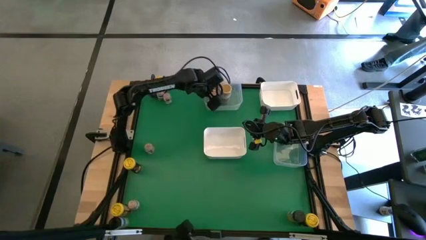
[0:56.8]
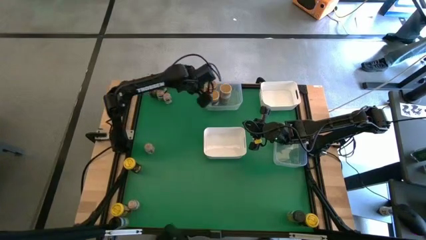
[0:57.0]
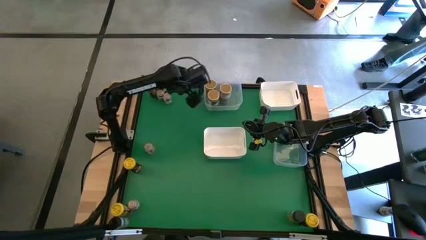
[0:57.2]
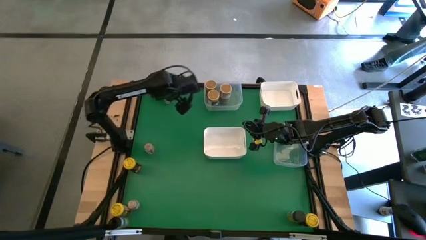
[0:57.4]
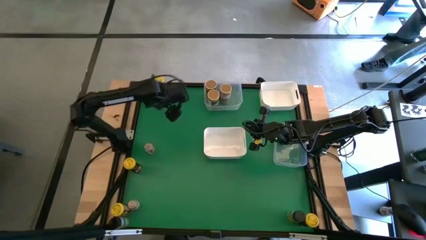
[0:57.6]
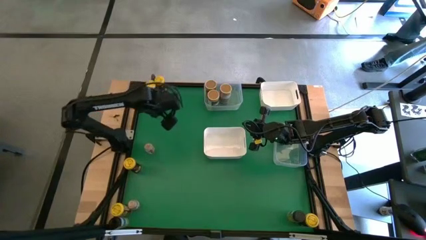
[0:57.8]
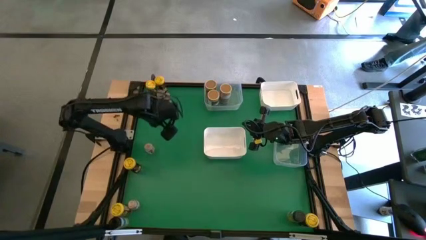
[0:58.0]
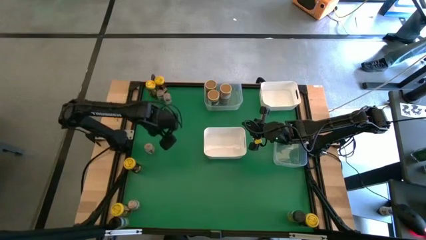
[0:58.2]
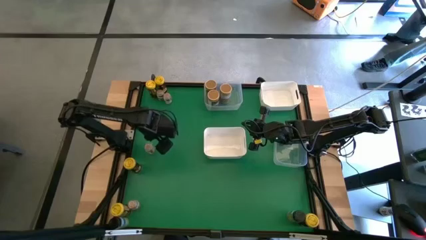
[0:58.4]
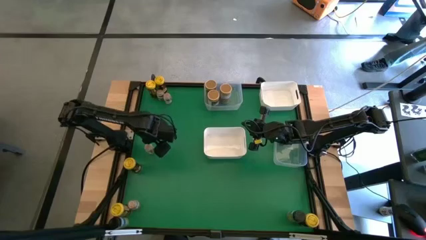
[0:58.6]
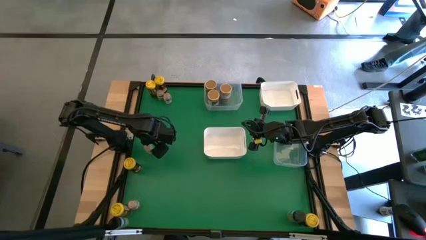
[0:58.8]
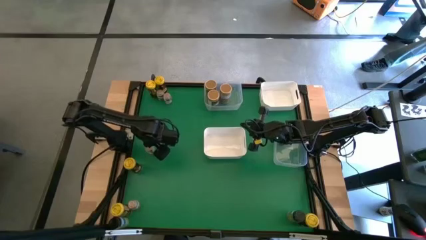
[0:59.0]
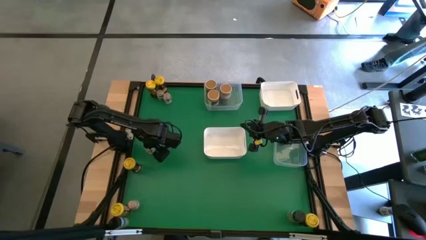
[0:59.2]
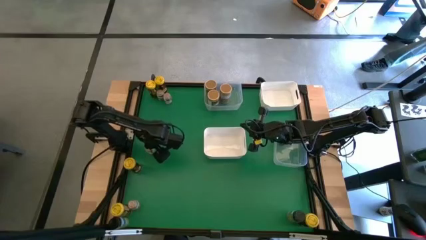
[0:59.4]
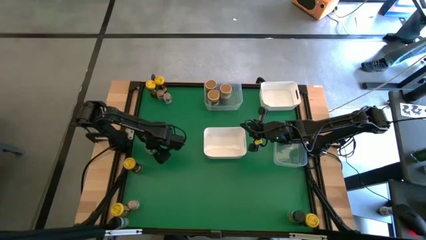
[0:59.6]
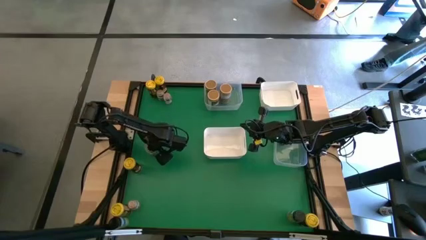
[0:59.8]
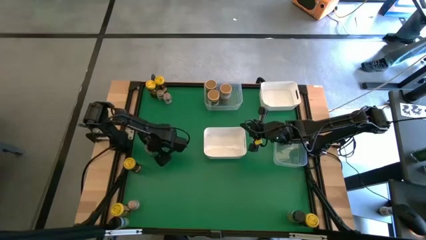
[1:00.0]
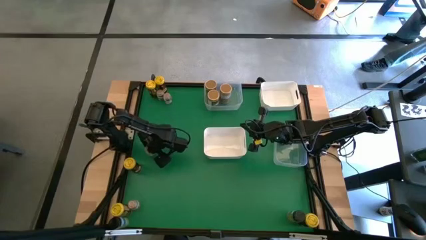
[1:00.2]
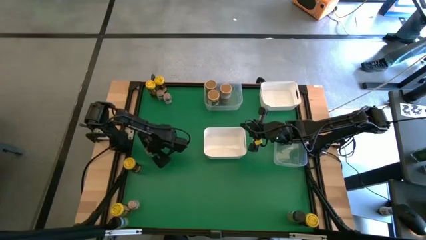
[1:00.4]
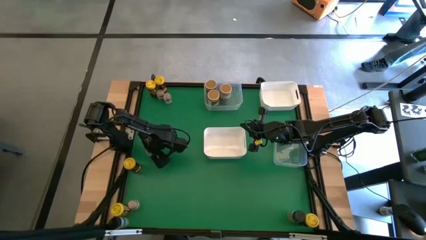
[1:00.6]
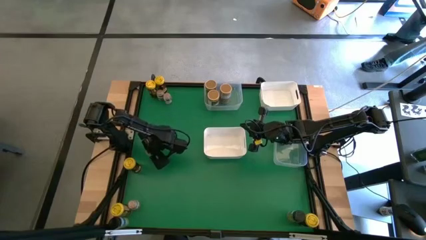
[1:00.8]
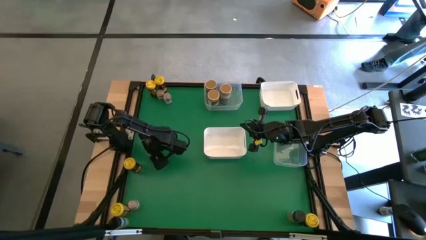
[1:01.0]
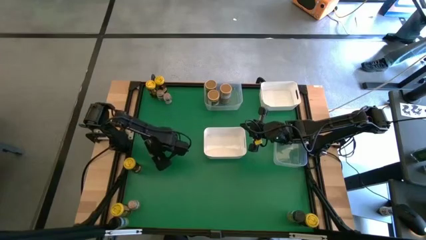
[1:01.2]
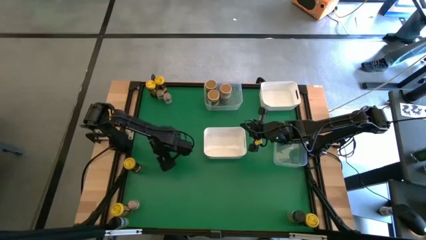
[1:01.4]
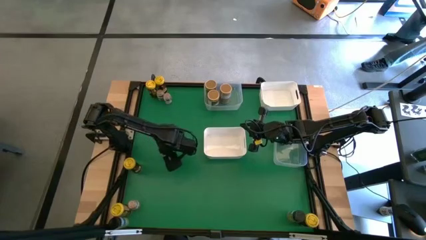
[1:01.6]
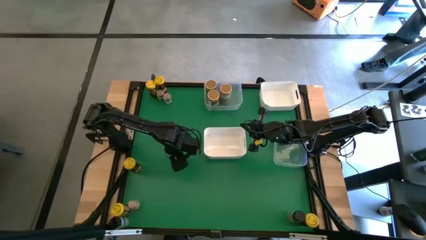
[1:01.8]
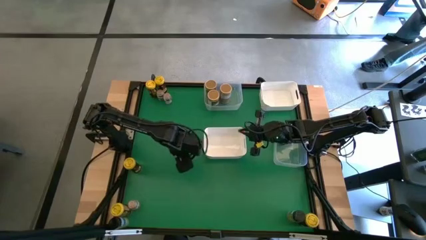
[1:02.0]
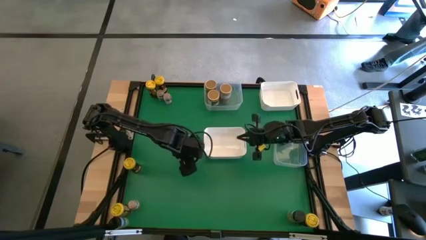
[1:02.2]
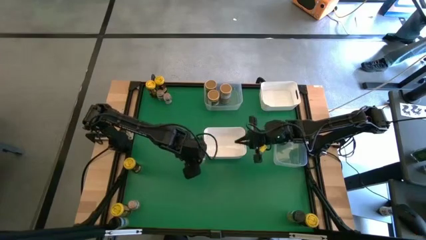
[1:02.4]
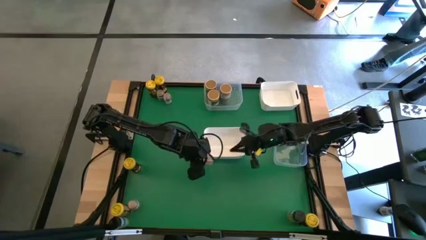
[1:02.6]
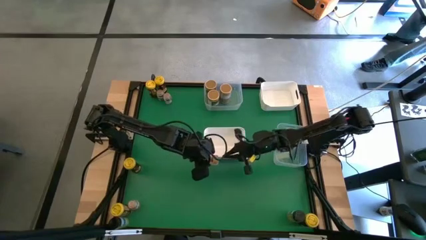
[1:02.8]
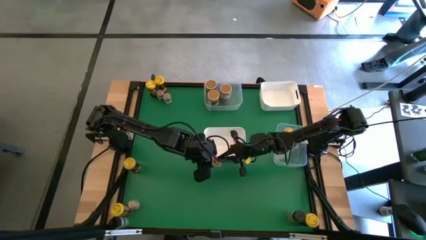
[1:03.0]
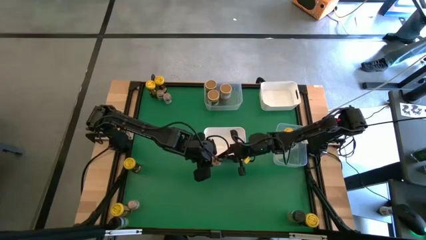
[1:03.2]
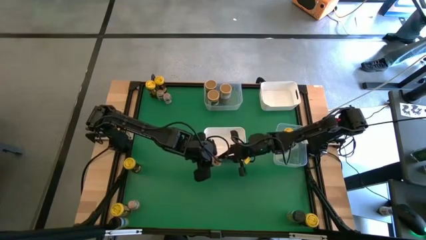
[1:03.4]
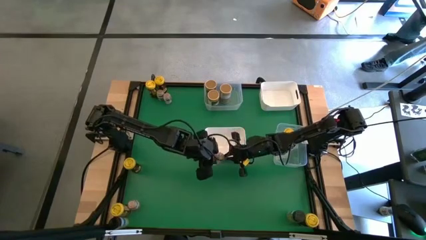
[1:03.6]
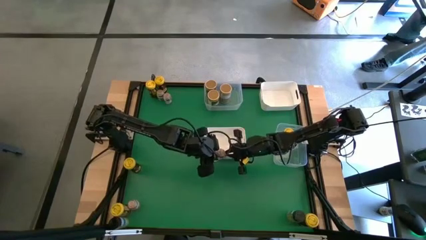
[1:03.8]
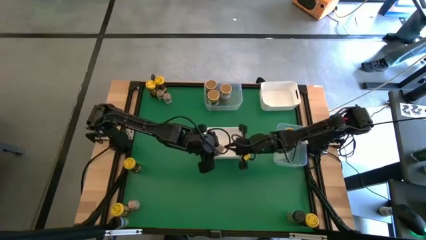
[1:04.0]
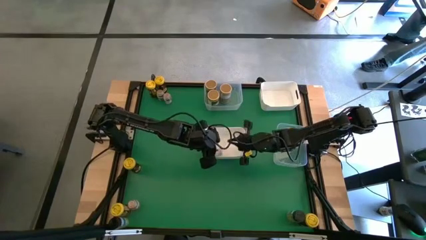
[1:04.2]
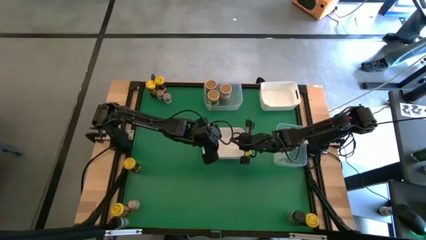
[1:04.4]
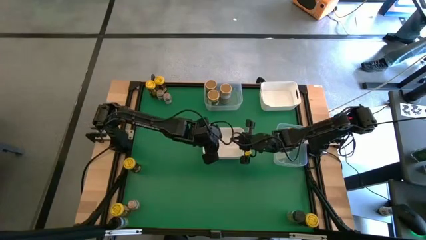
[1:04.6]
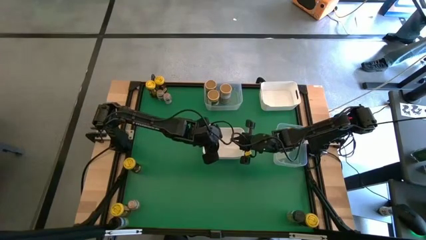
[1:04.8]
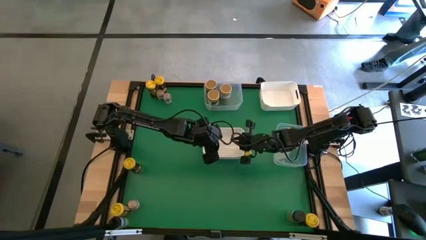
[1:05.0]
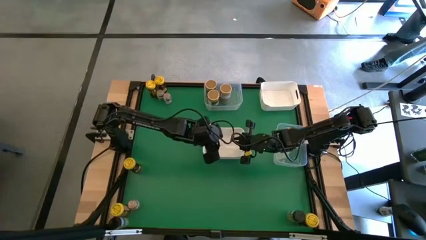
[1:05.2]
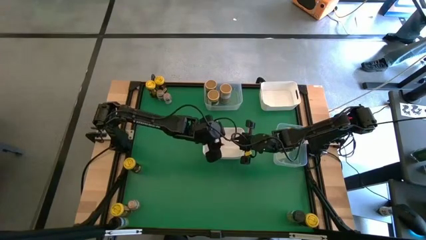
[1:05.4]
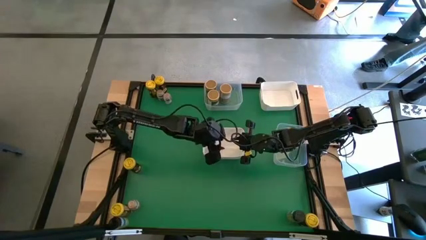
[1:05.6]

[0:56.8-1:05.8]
Task: Sort spices by type
Put the brown seasoning bottle into the bottom white bin

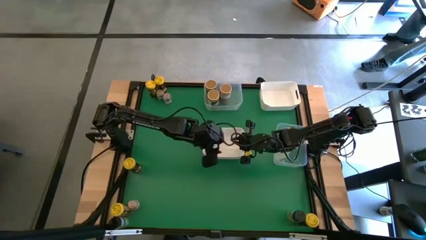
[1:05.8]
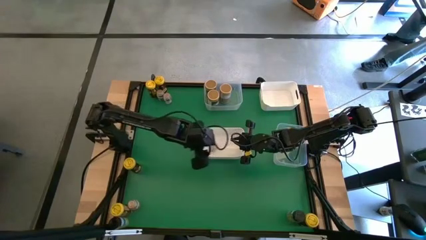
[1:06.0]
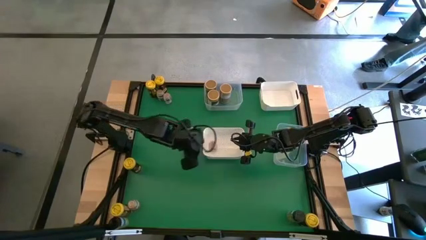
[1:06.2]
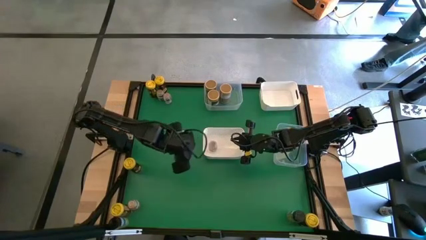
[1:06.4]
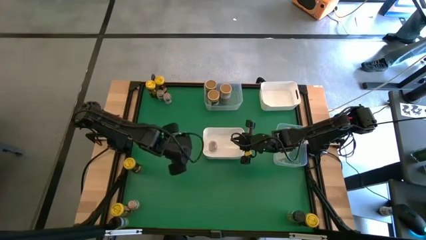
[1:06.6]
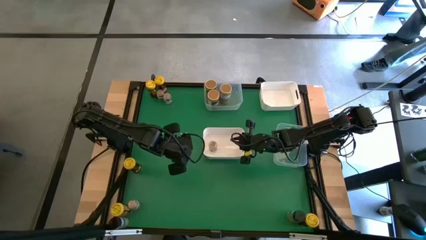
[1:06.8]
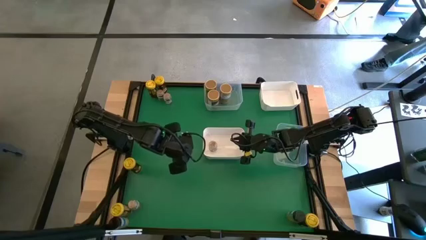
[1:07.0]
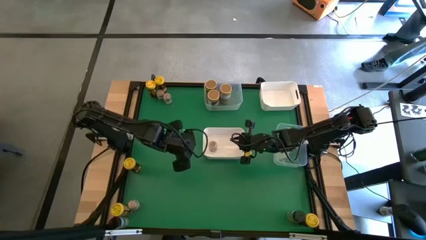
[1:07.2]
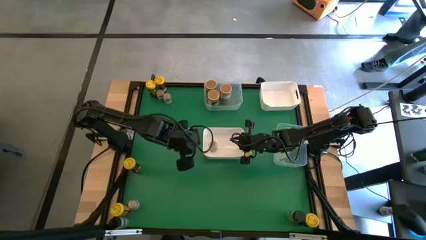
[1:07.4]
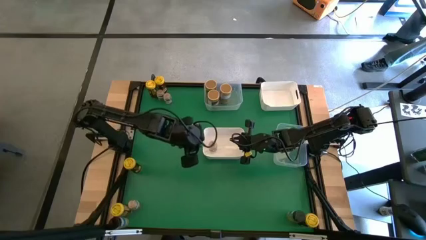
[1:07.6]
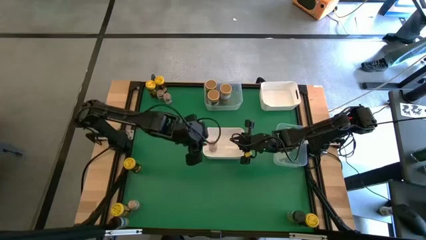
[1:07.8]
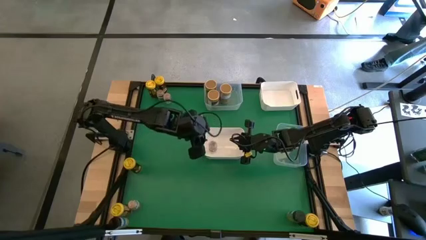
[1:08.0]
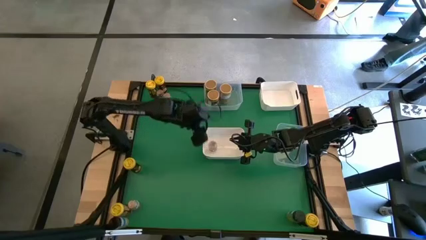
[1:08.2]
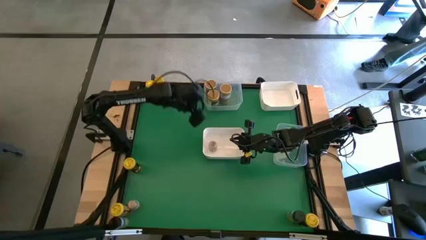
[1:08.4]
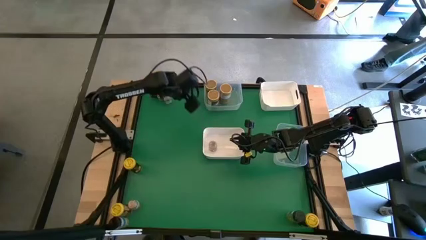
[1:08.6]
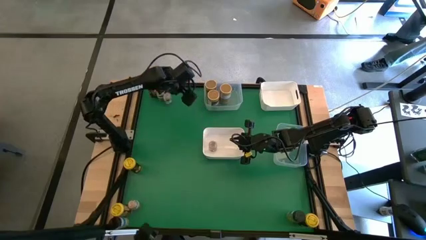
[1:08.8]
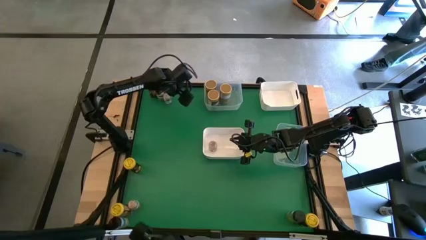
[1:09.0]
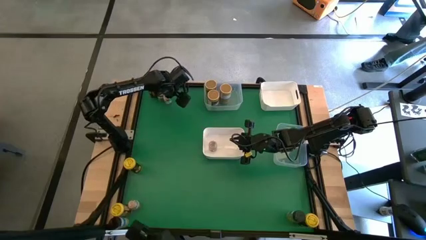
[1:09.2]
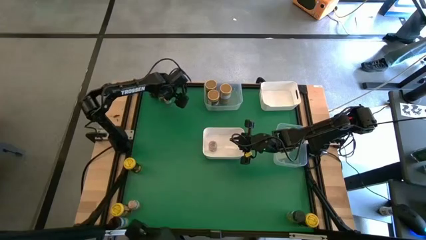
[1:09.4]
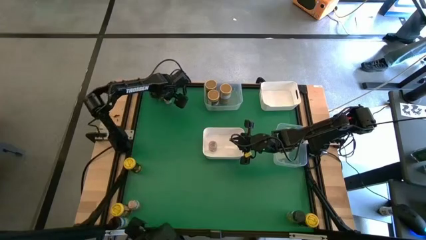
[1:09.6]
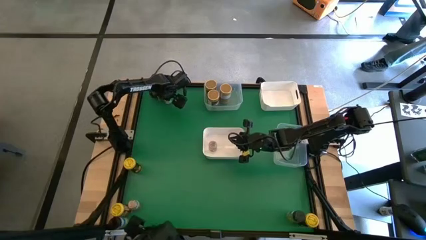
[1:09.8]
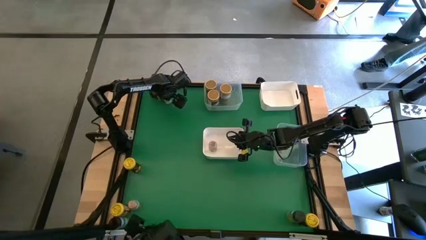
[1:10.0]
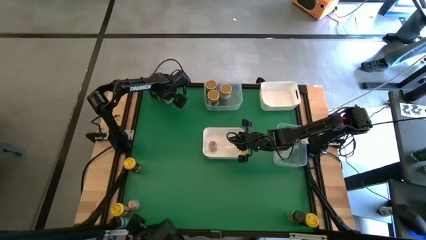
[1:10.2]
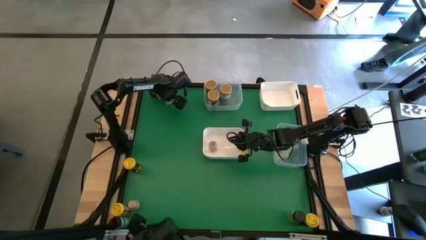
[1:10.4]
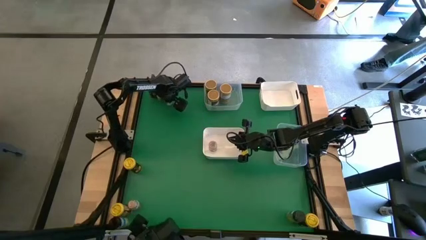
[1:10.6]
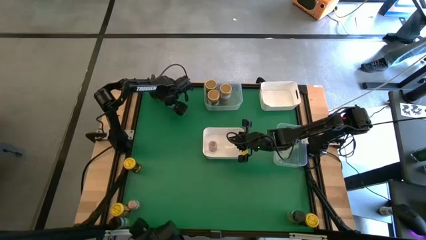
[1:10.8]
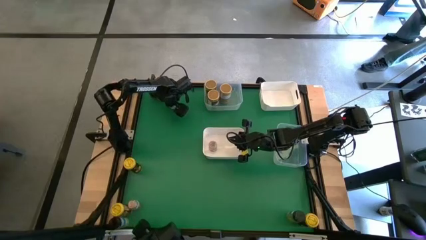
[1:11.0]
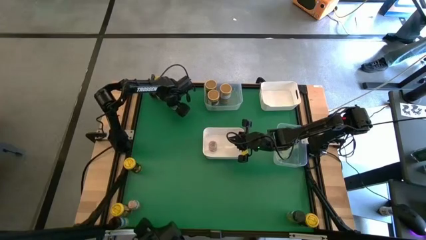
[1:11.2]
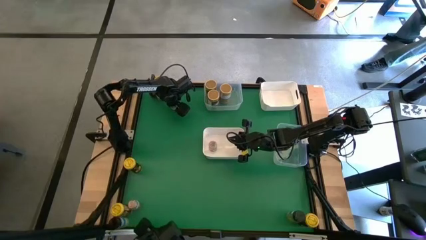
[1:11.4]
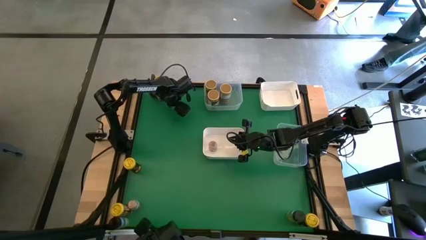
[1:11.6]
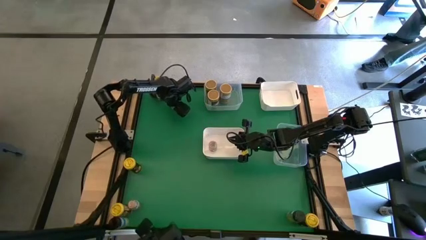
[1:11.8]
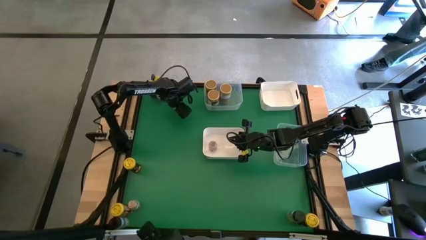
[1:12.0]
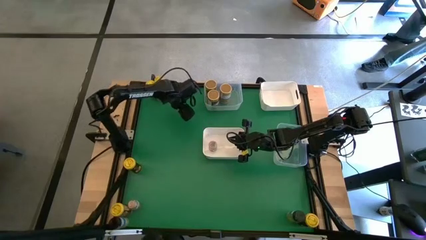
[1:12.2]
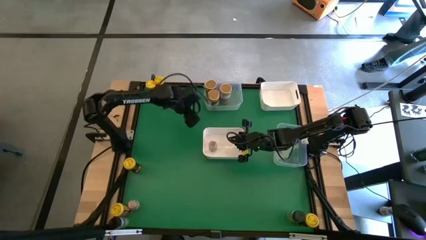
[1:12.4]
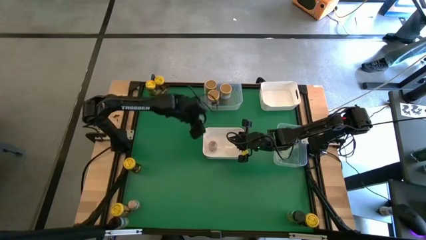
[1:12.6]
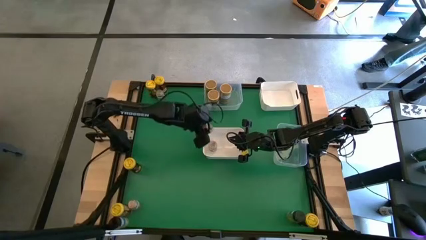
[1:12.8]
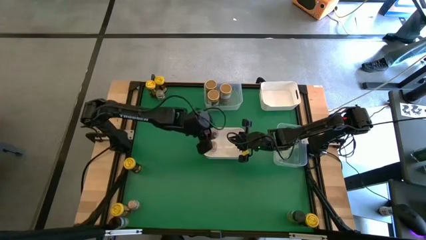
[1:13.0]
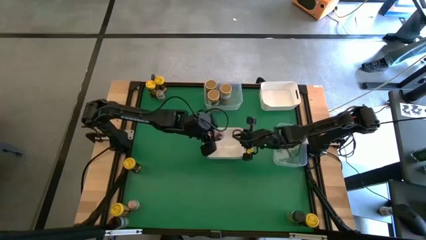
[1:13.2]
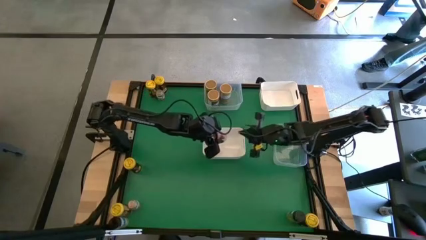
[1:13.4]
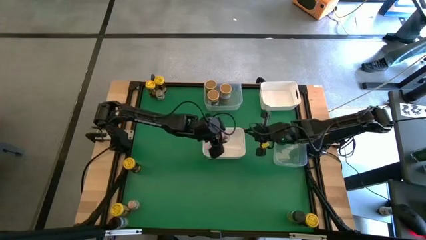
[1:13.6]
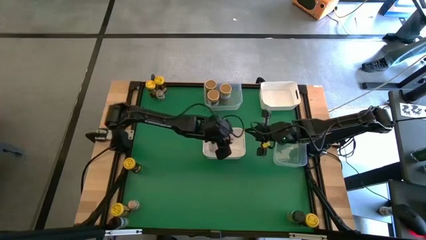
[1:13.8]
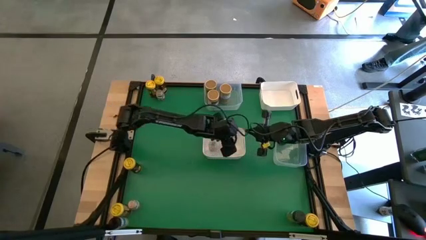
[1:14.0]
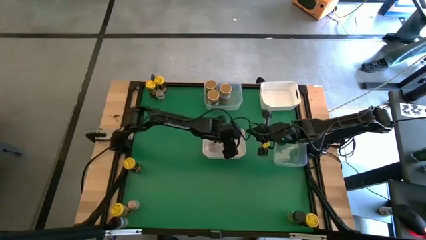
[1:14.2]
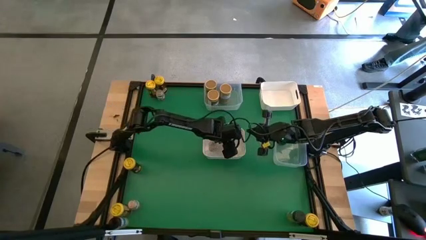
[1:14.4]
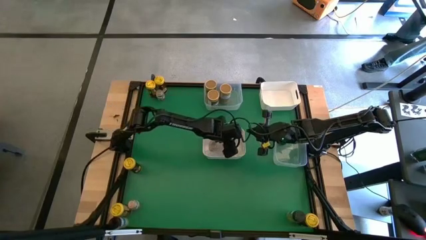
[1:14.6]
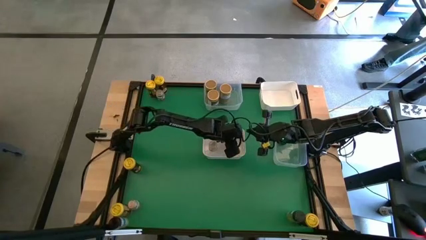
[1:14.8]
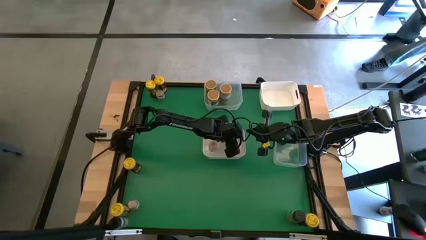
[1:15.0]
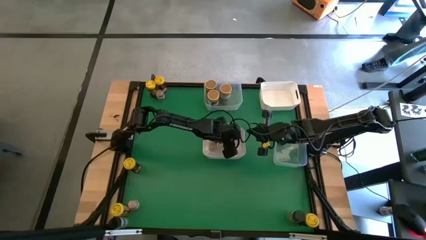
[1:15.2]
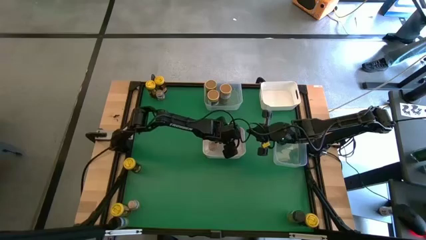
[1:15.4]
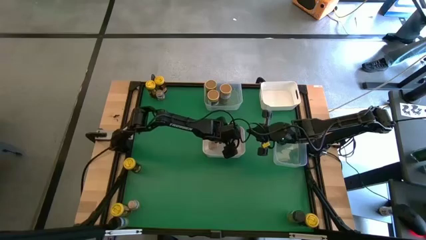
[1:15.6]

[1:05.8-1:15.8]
Put the brown seasoning bottle into the bottom white bin
